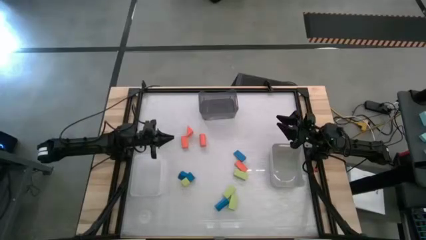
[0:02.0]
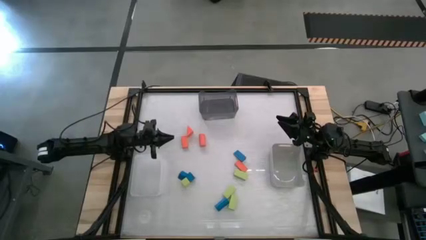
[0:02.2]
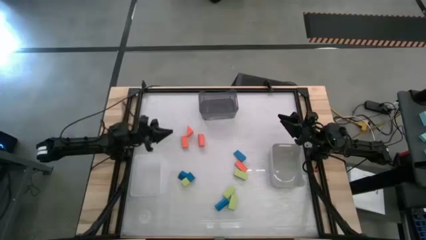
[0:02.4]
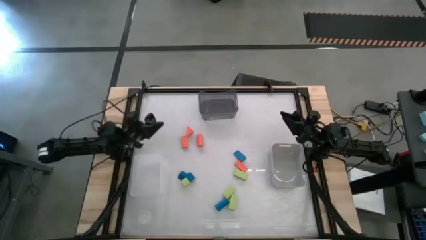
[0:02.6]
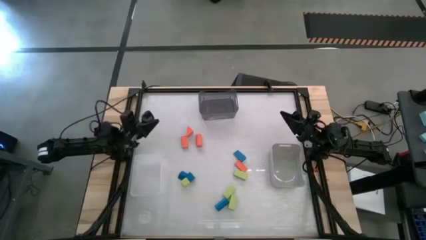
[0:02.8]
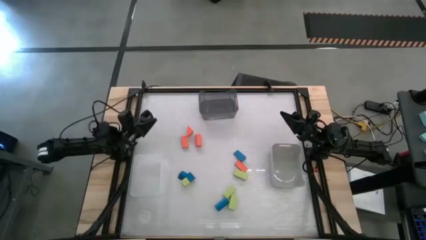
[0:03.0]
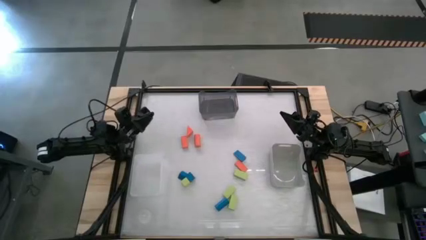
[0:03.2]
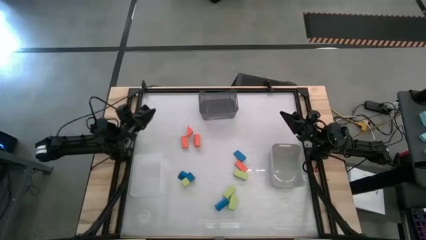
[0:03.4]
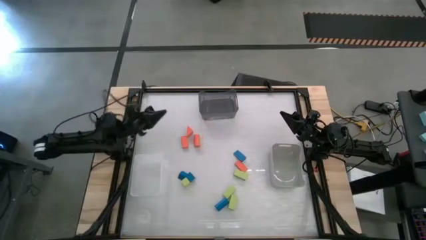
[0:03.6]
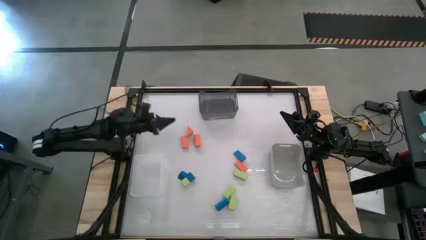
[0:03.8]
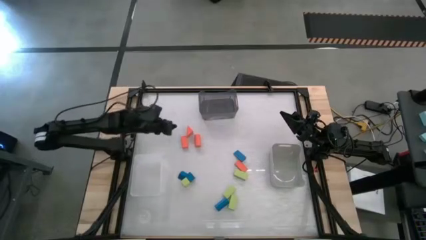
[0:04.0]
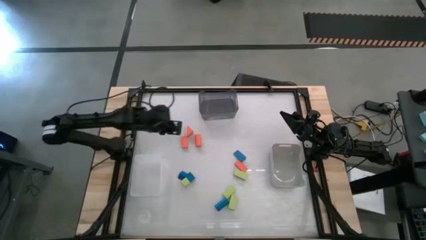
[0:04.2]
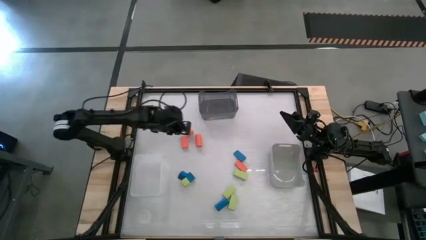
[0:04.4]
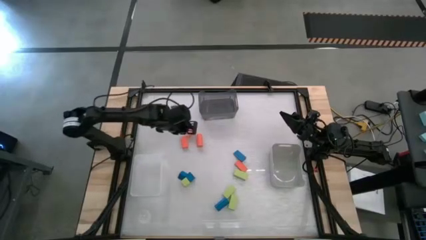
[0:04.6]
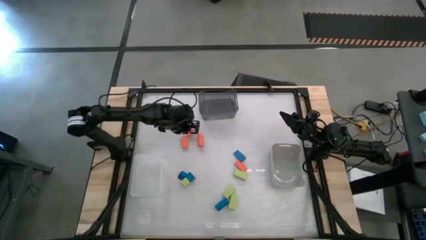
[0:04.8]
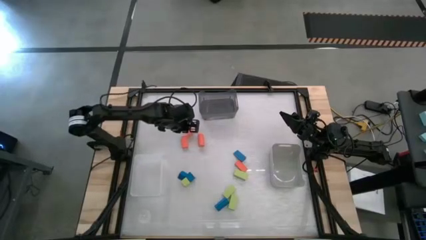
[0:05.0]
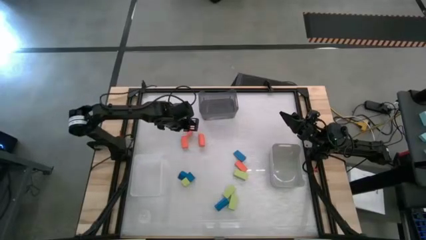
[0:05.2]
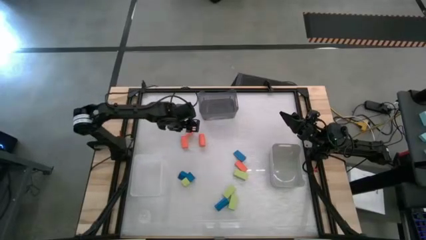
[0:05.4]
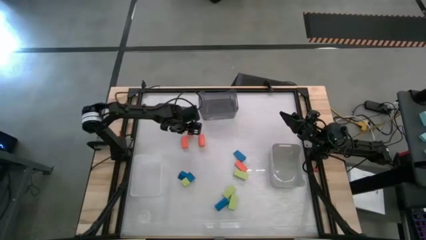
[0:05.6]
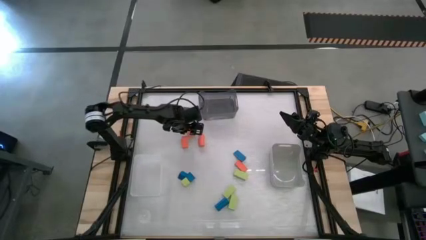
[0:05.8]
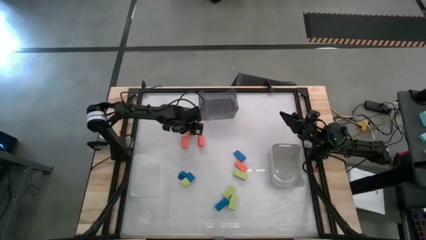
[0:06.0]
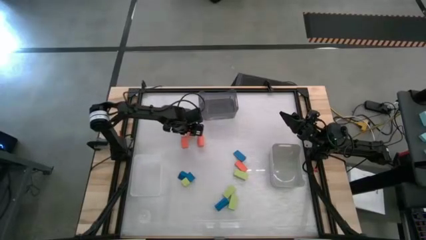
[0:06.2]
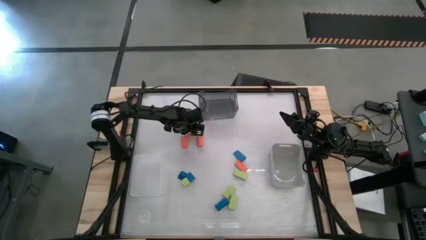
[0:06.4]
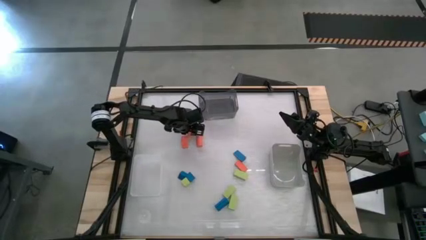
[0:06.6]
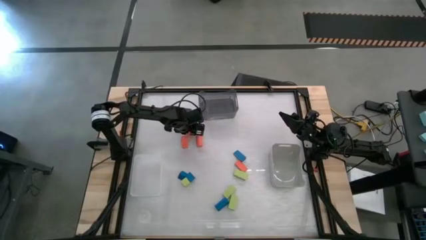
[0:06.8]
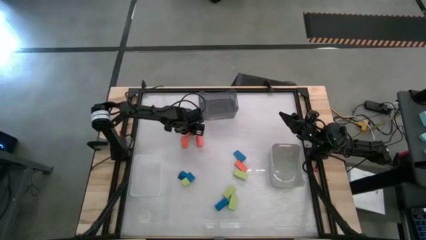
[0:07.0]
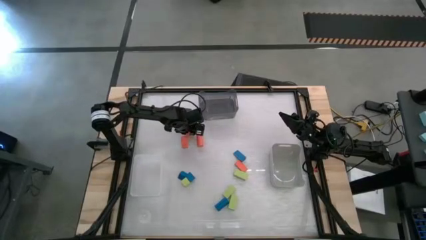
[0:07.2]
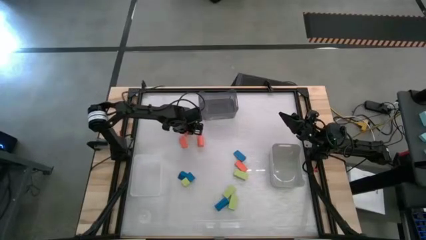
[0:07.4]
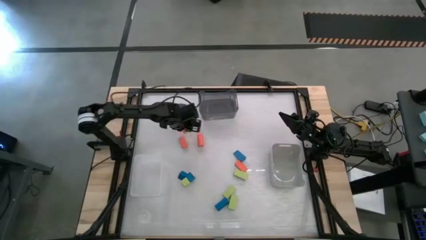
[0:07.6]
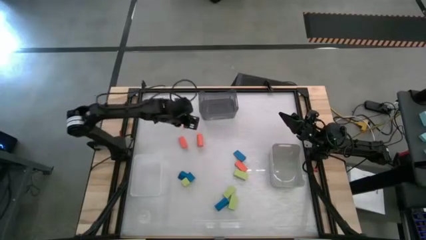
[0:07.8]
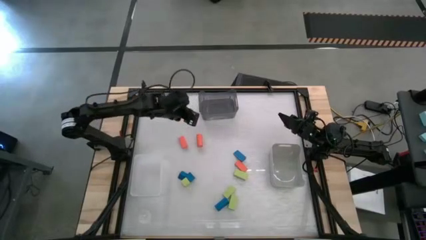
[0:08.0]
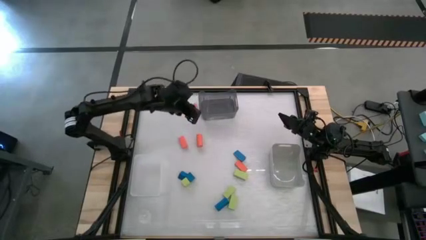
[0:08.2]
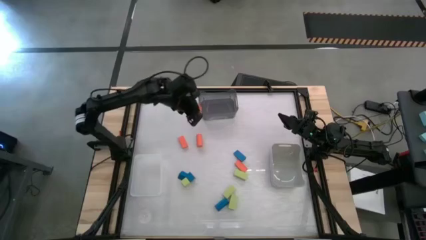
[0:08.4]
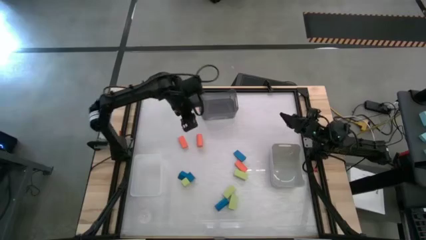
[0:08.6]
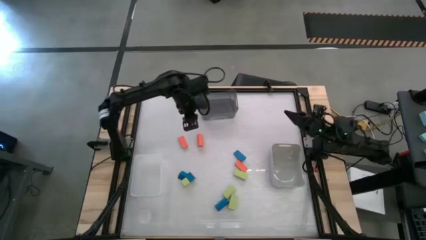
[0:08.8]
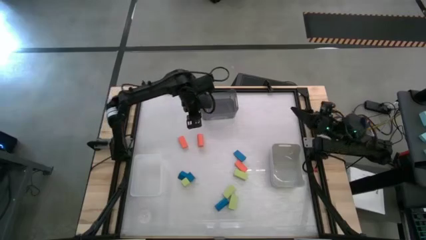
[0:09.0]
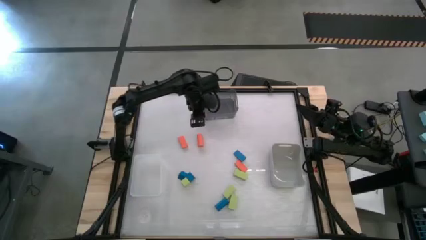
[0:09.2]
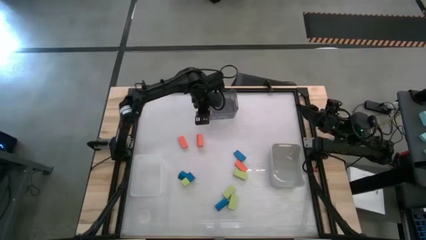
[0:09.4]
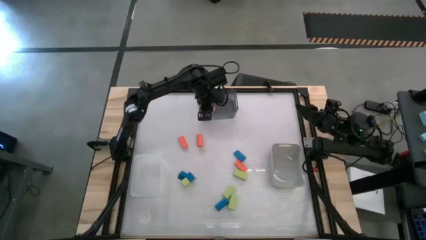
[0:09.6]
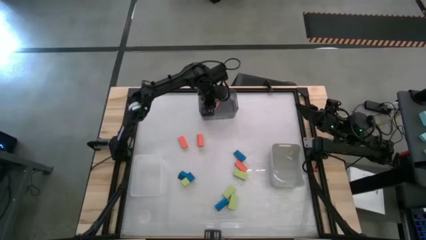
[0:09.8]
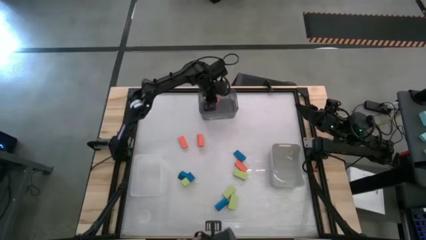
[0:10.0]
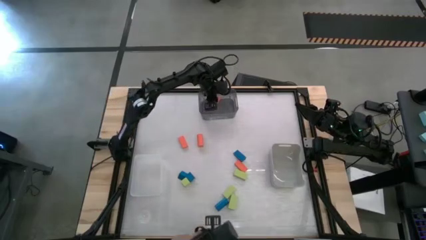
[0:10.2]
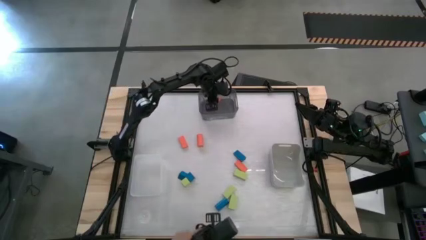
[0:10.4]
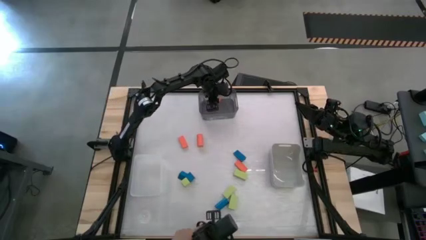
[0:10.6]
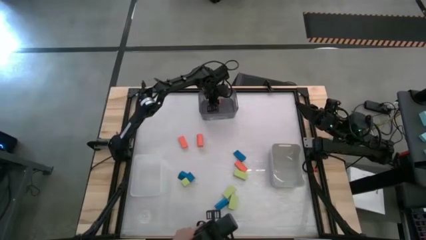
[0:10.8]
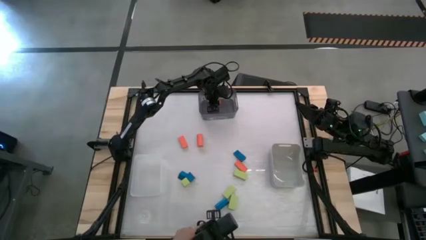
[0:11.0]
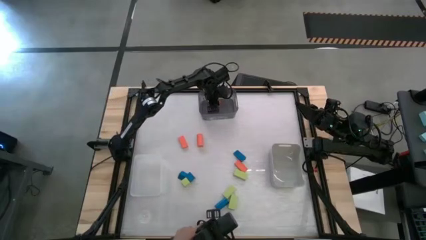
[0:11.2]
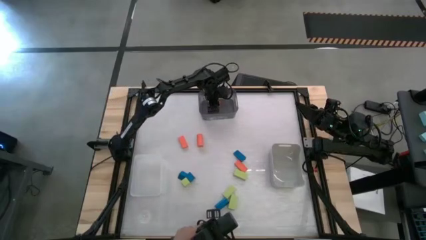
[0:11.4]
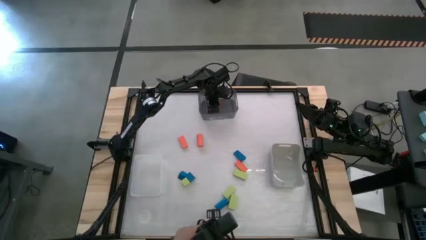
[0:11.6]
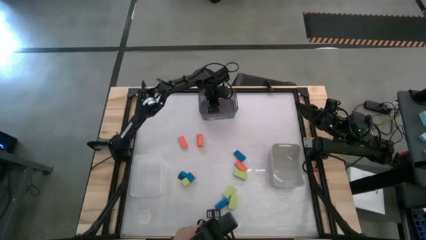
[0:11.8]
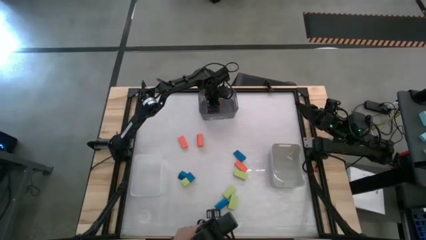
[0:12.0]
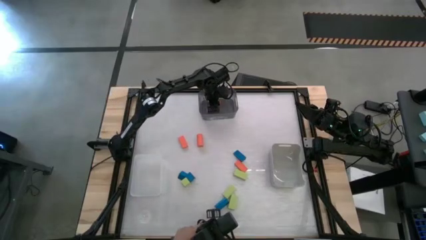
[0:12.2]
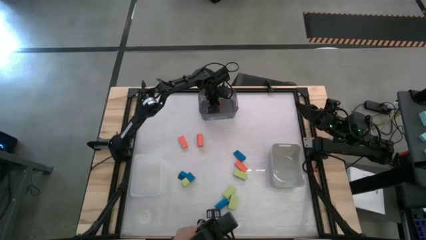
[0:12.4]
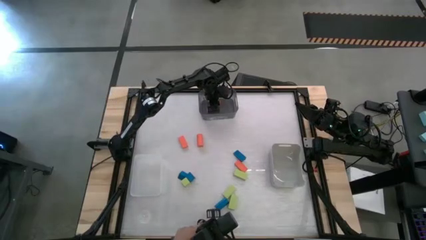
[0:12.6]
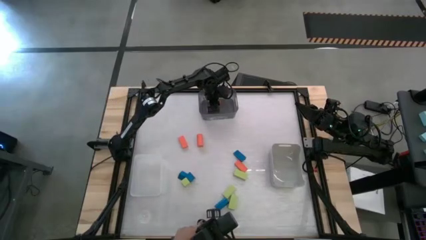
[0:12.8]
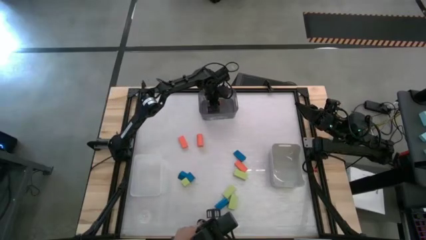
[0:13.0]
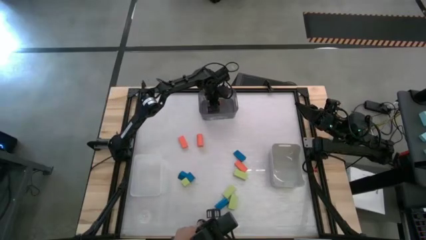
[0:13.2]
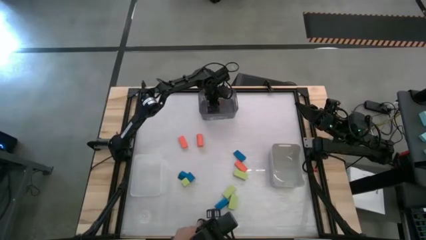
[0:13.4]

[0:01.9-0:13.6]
Task: Sort & place blocks by color
Put the orange block into the black bin
